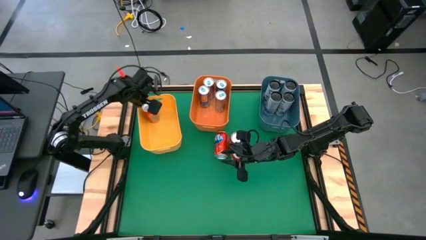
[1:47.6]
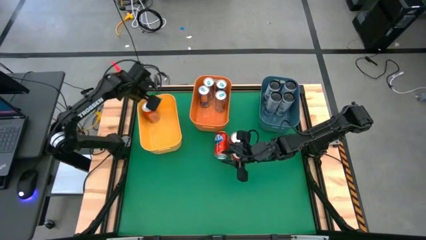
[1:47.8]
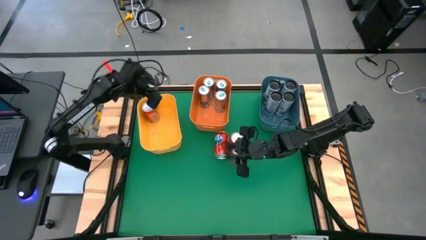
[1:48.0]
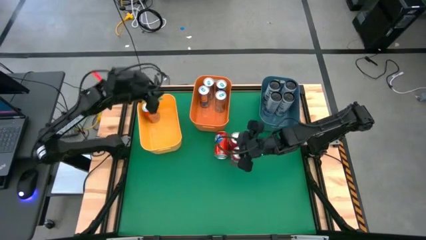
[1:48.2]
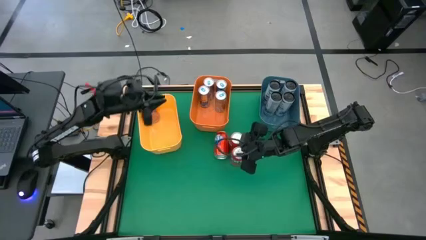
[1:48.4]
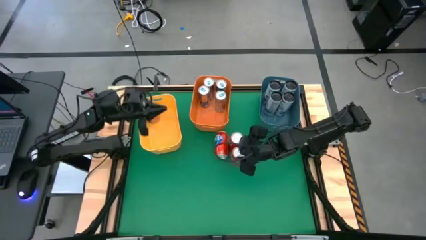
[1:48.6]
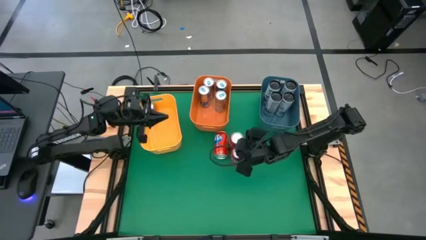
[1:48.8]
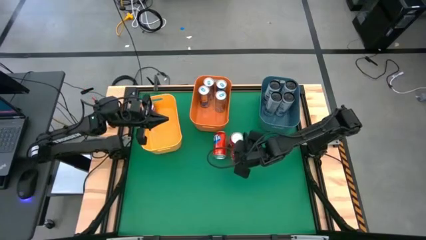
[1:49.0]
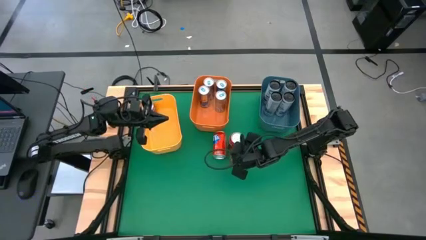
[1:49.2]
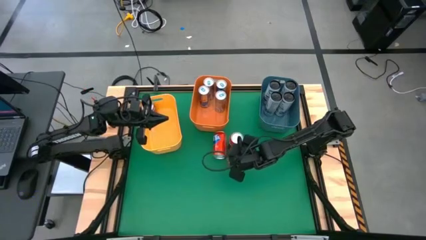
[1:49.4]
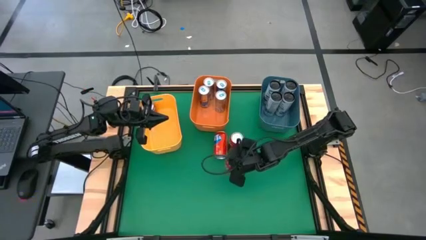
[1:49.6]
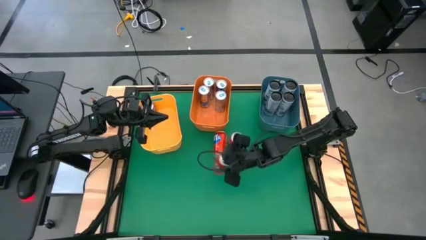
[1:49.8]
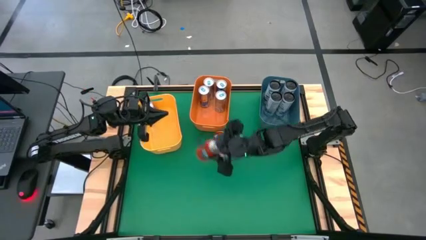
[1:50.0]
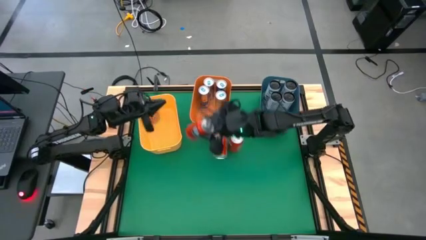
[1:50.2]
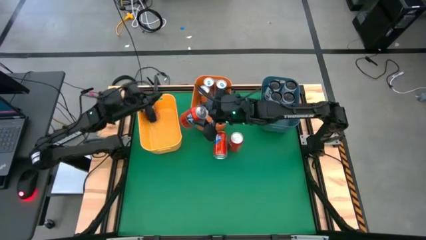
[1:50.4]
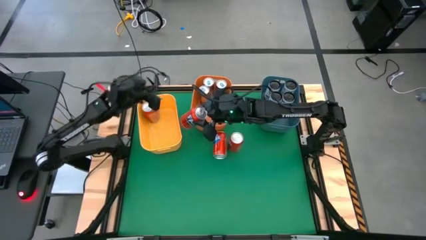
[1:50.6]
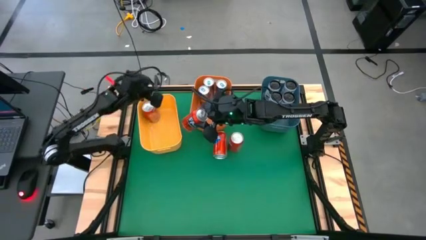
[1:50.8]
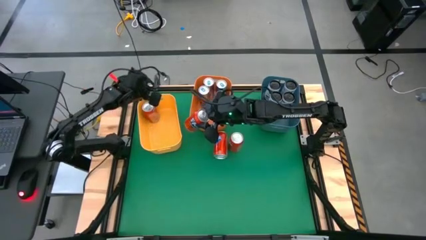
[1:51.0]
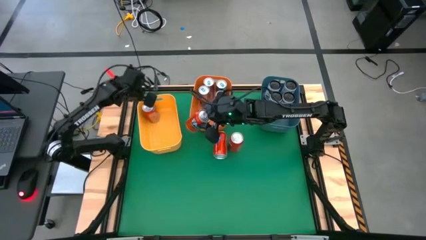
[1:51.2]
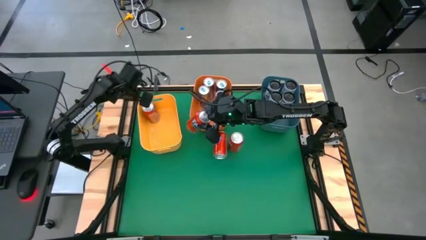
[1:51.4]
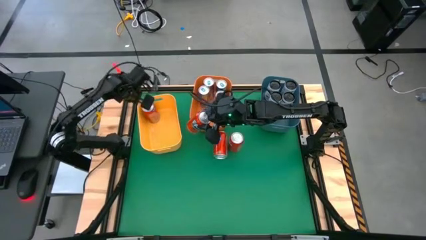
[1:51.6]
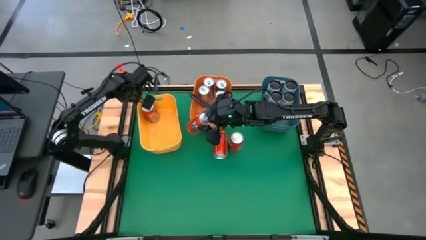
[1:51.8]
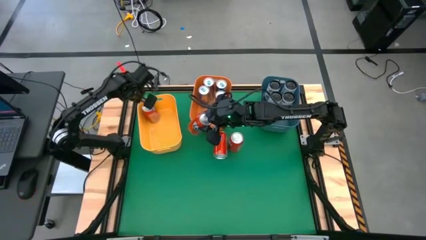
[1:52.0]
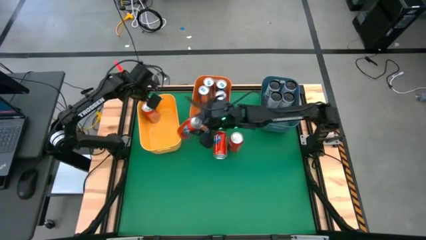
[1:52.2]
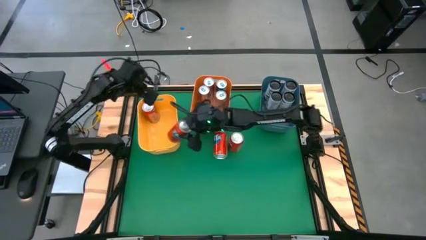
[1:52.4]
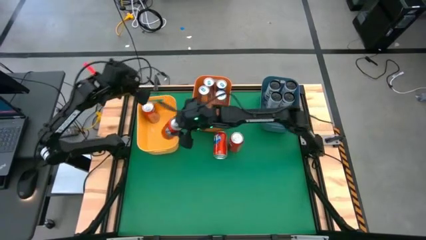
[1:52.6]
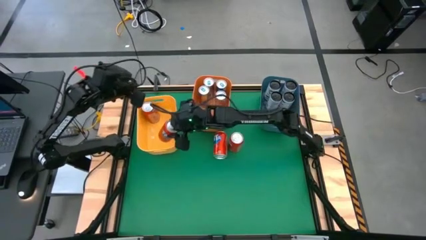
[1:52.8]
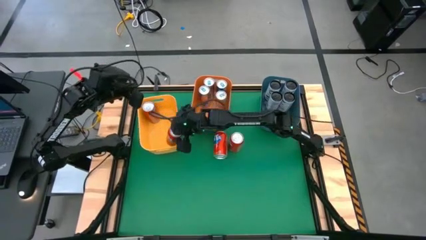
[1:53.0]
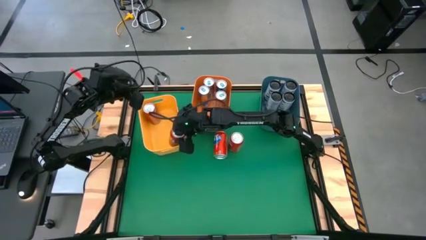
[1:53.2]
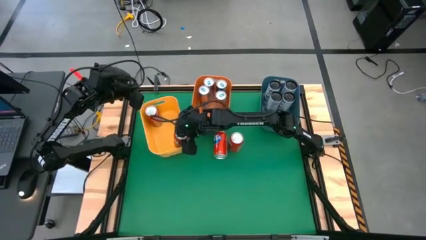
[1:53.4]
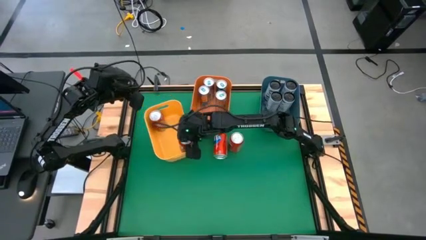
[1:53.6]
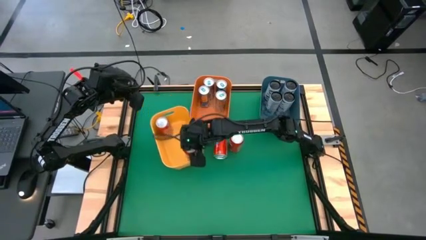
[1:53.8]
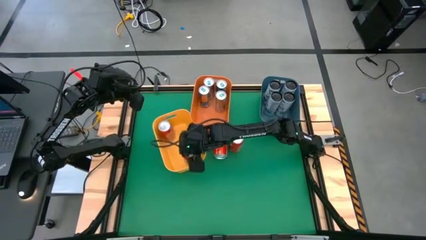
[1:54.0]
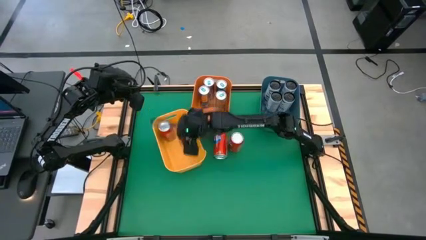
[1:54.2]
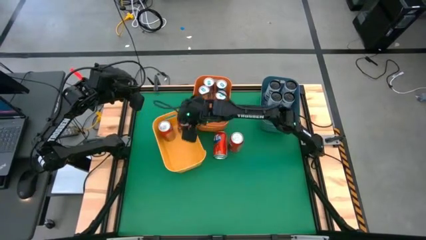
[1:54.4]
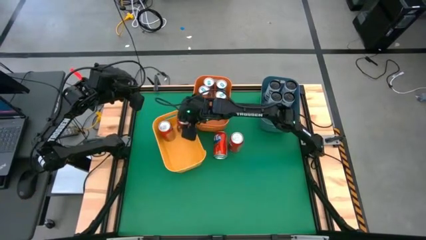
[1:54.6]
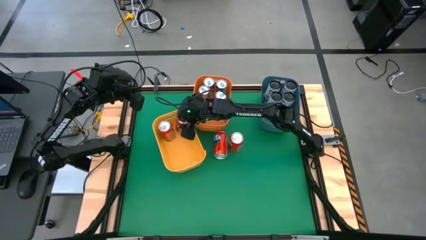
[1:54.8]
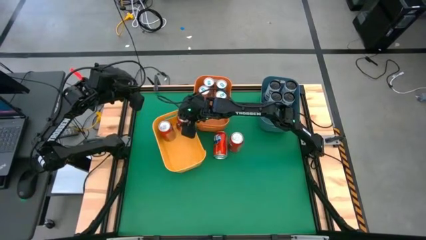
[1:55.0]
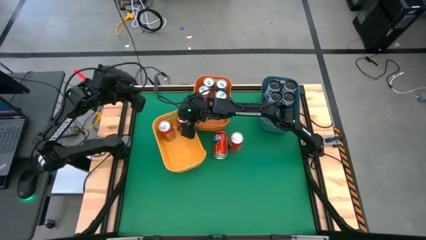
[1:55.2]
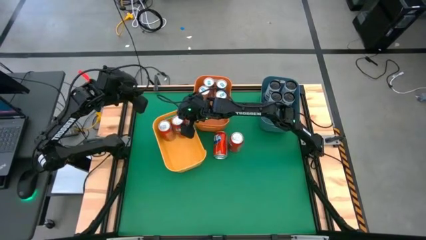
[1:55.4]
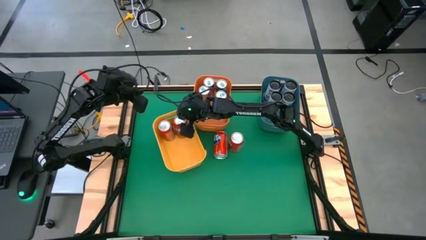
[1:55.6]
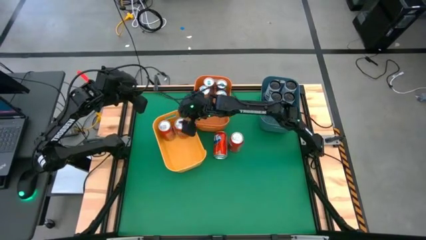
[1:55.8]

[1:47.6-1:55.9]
Task: Sort soda cans
Put the orange soda can into the yellow bin

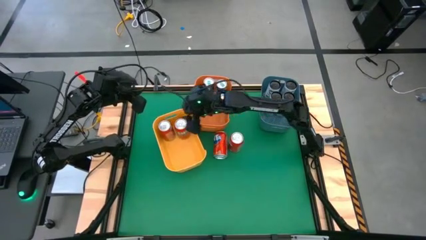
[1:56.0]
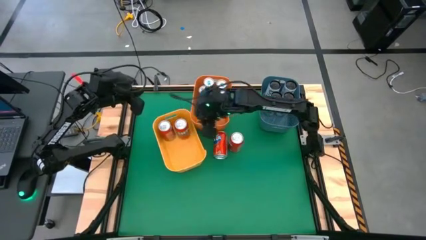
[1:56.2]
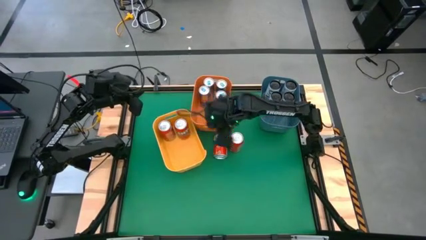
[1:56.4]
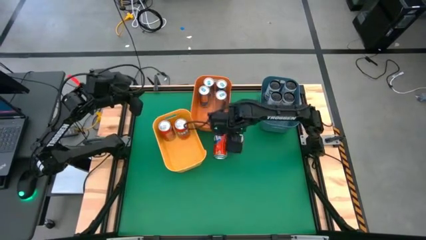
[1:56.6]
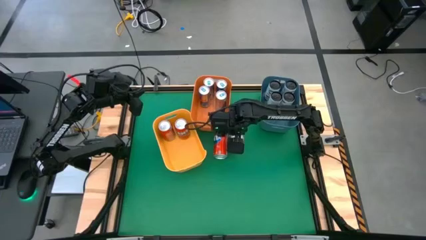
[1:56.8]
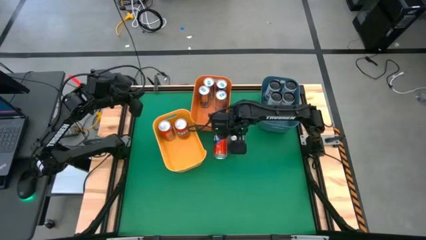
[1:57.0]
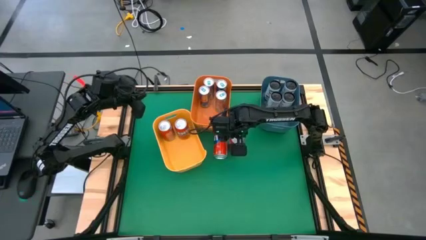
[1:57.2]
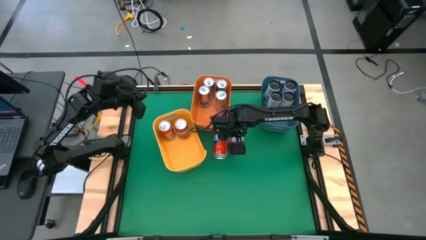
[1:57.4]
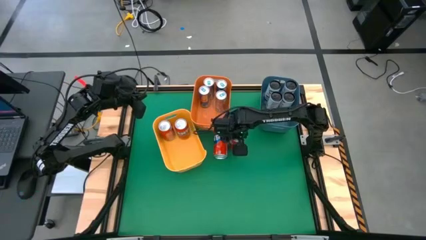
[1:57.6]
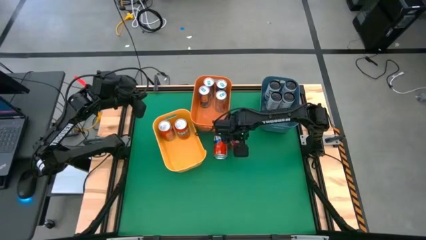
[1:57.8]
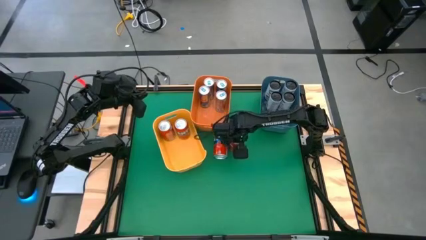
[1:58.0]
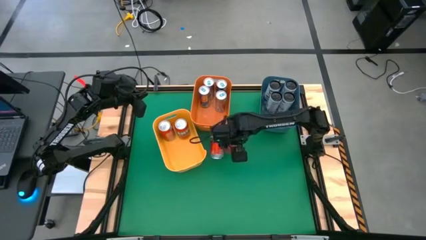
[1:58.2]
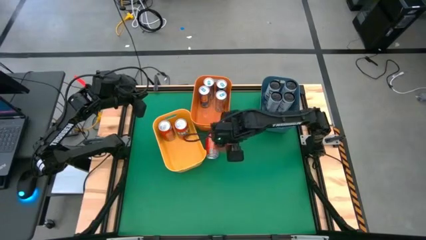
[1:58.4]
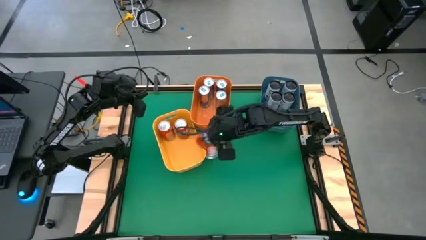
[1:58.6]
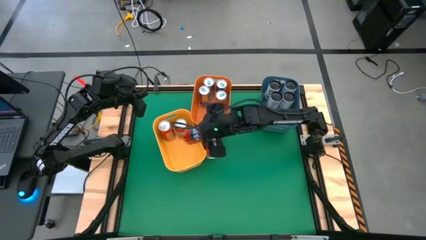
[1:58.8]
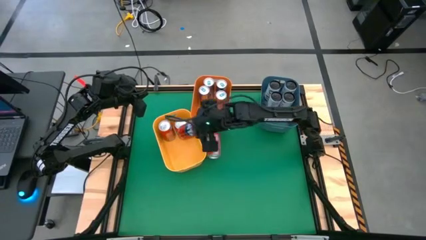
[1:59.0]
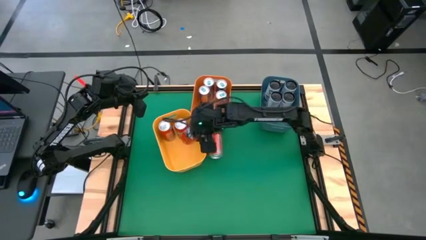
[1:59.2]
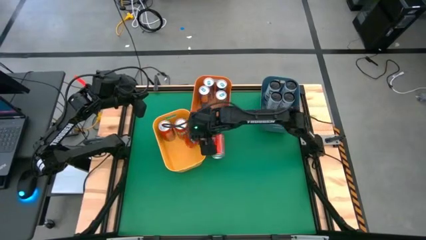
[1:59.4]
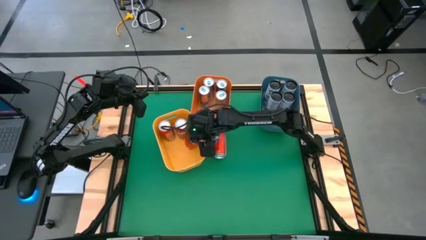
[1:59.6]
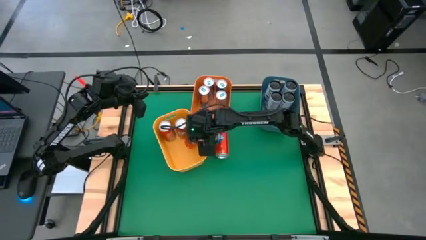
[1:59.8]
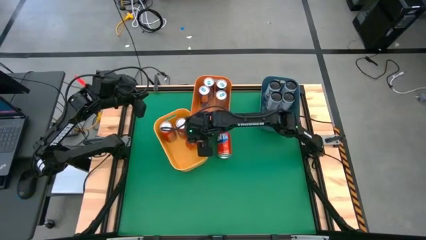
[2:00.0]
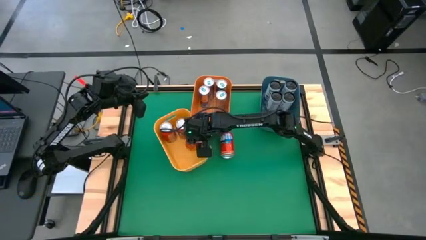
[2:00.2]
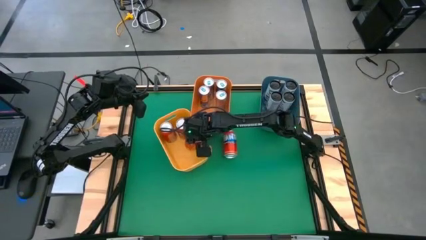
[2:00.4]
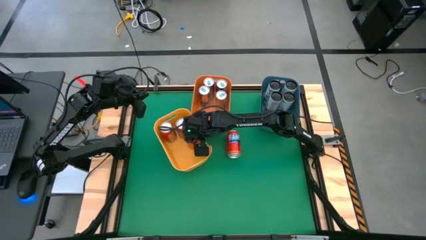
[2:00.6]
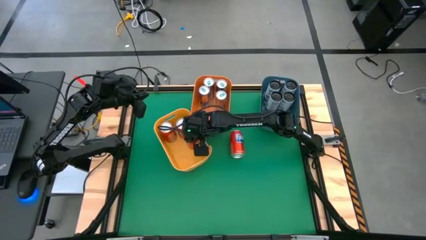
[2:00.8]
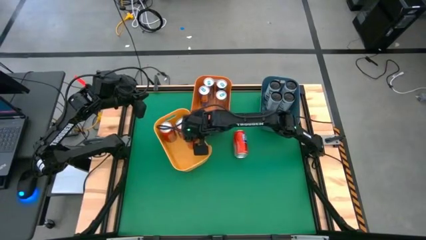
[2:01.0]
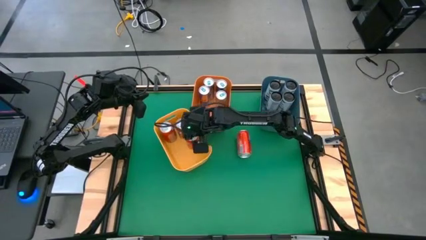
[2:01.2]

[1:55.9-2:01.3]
Put the orange soda can into the yellow bin
